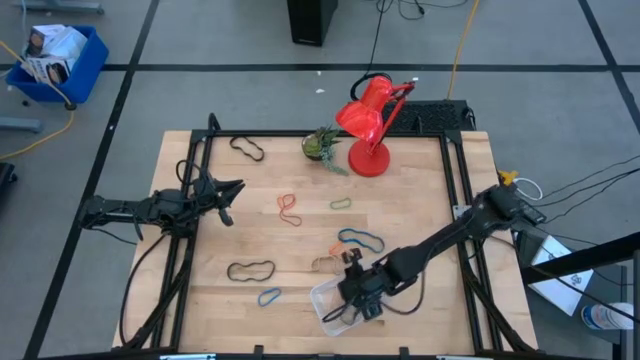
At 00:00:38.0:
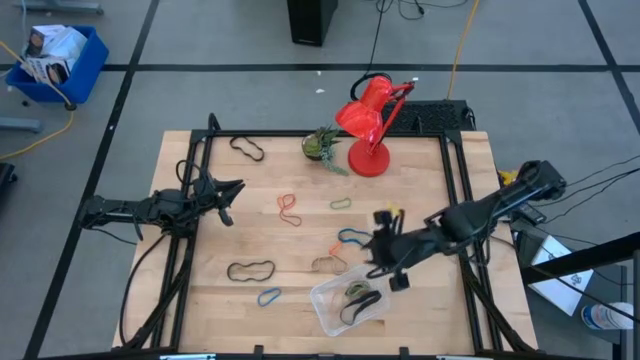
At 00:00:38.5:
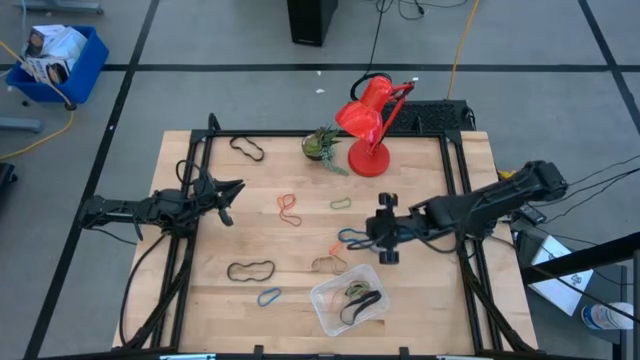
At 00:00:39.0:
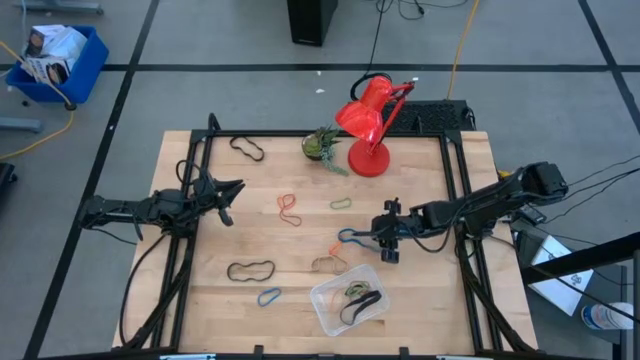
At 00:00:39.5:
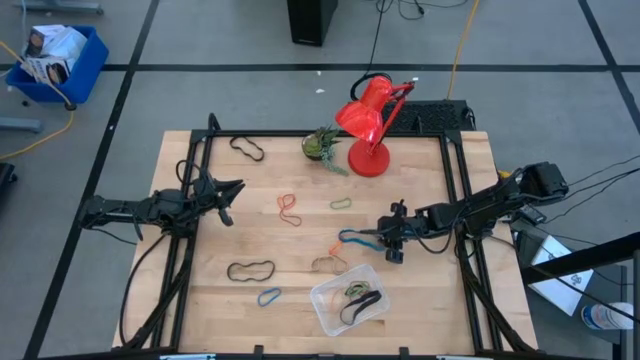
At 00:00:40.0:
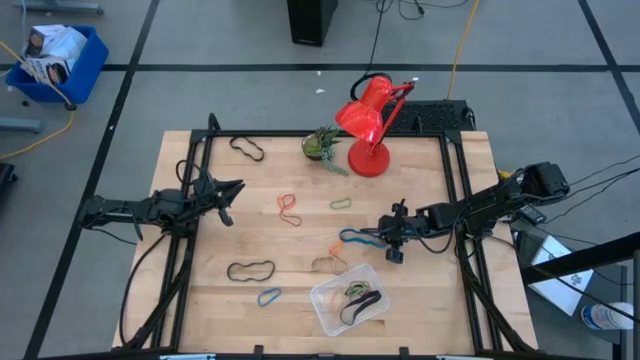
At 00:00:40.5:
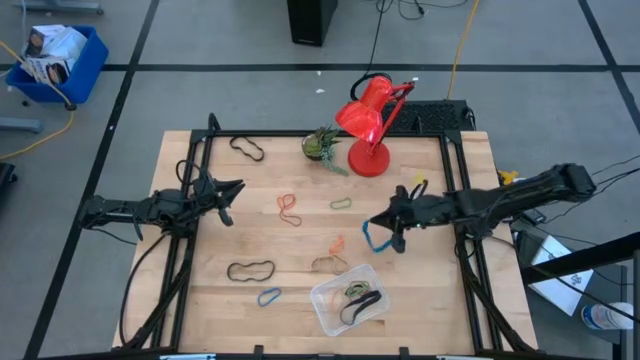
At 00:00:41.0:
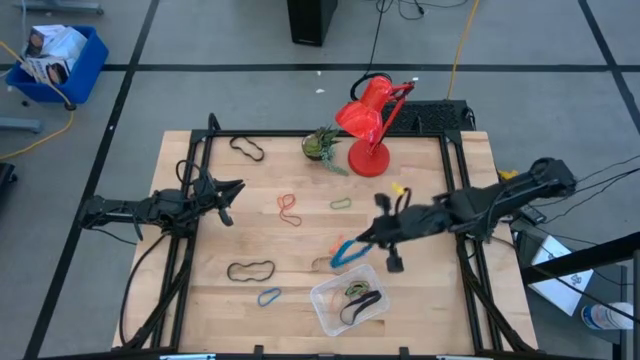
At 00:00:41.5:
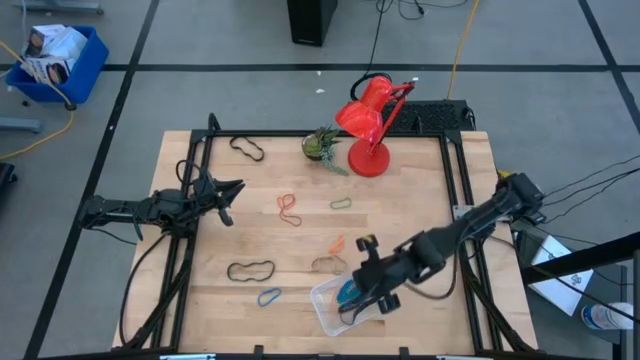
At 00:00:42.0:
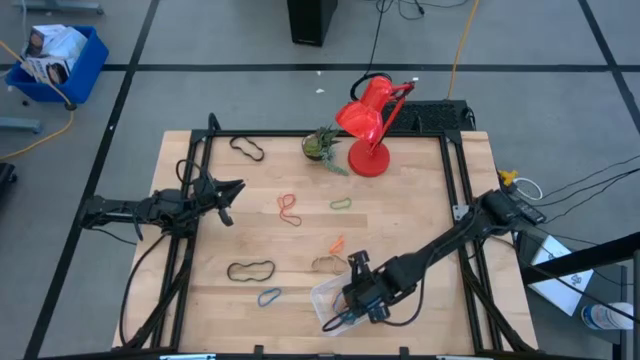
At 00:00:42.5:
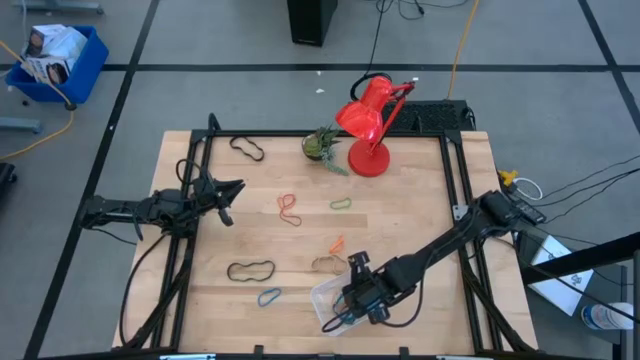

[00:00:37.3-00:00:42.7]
Task: Pick and place rubber bands into bin
Put the blue rubber band into the transparent container

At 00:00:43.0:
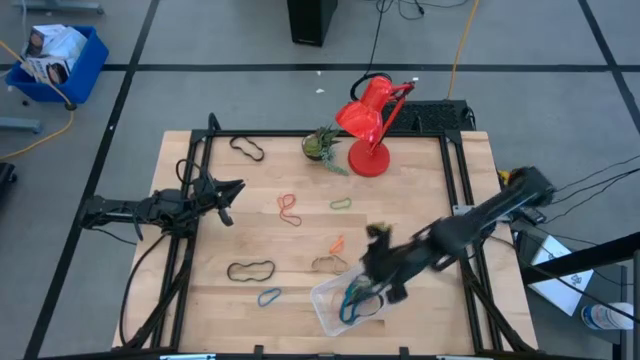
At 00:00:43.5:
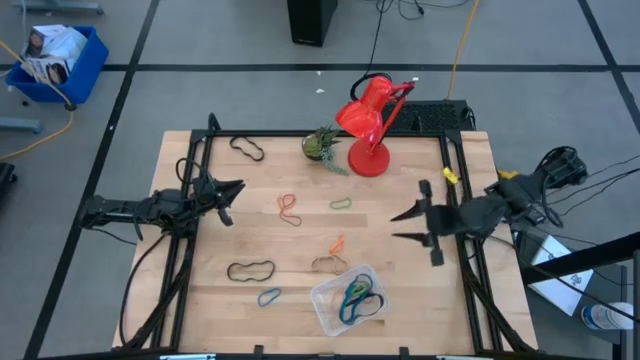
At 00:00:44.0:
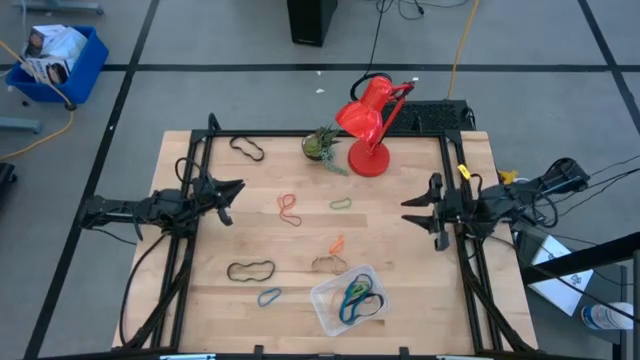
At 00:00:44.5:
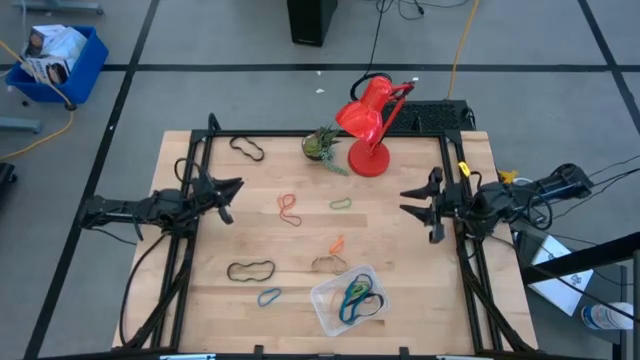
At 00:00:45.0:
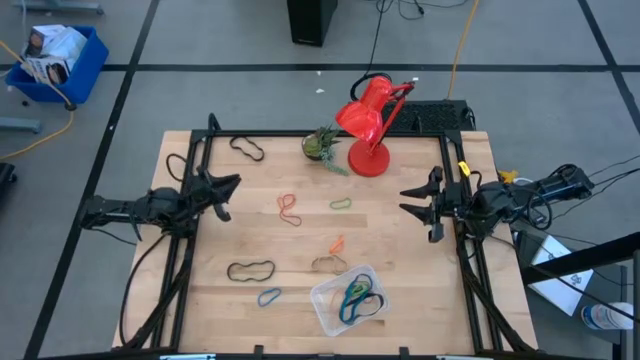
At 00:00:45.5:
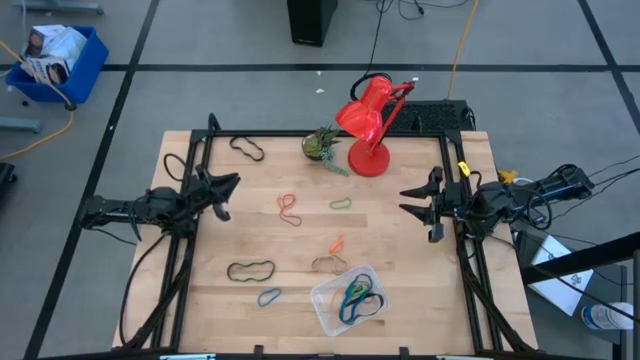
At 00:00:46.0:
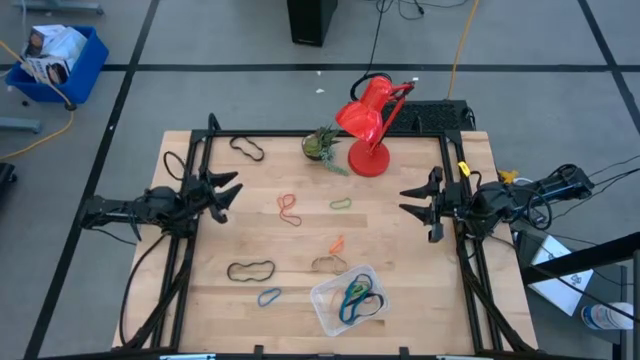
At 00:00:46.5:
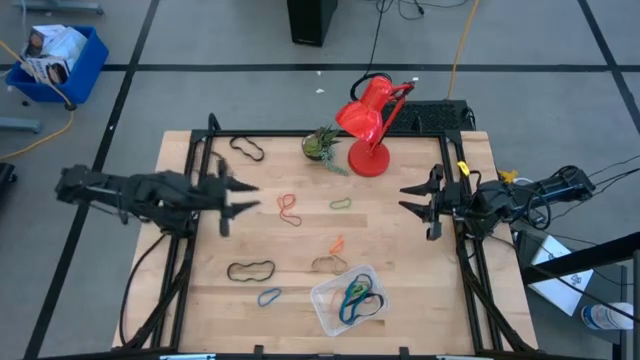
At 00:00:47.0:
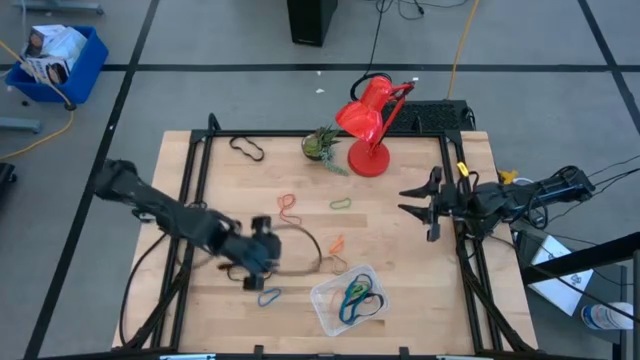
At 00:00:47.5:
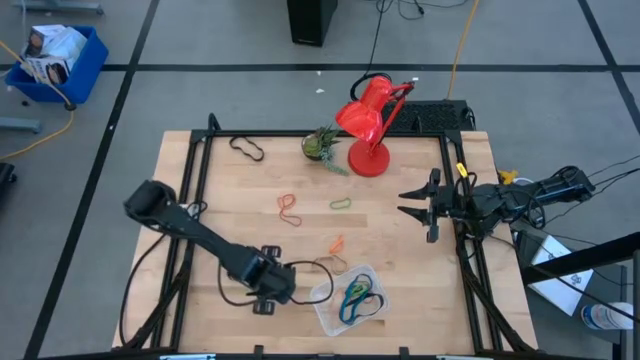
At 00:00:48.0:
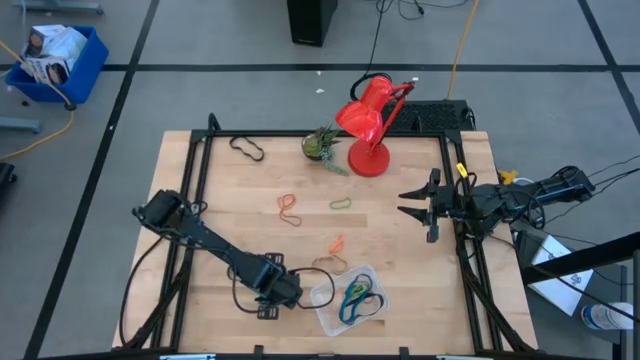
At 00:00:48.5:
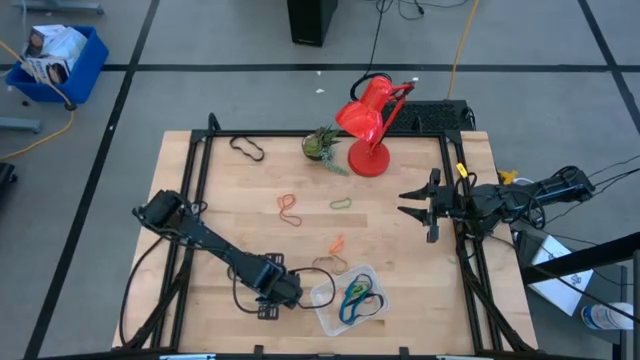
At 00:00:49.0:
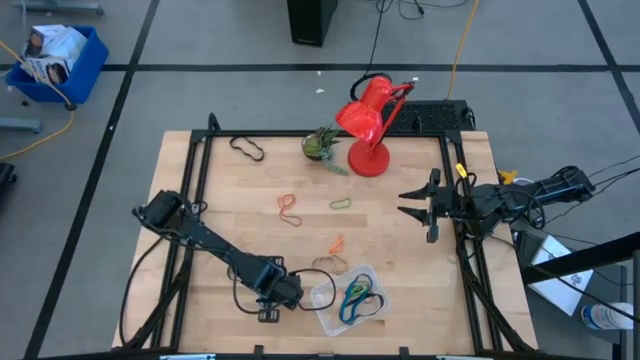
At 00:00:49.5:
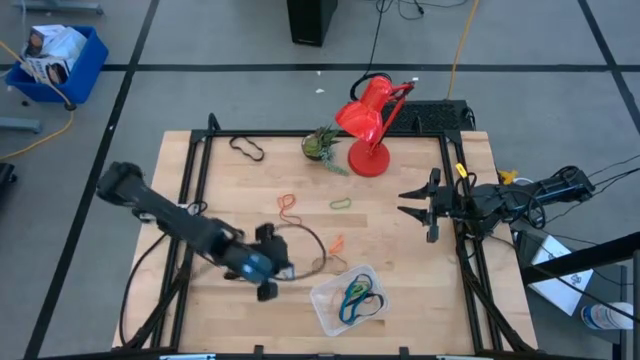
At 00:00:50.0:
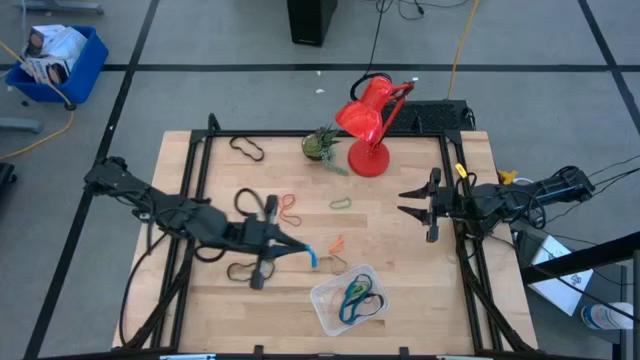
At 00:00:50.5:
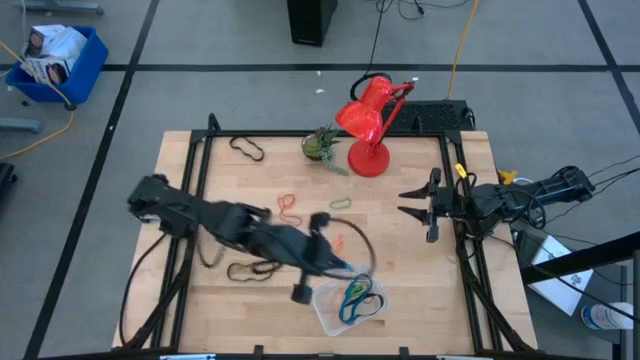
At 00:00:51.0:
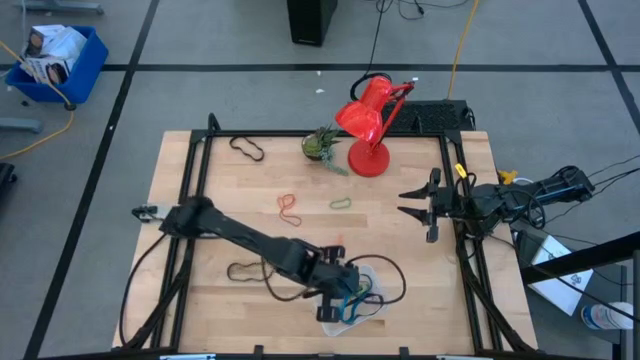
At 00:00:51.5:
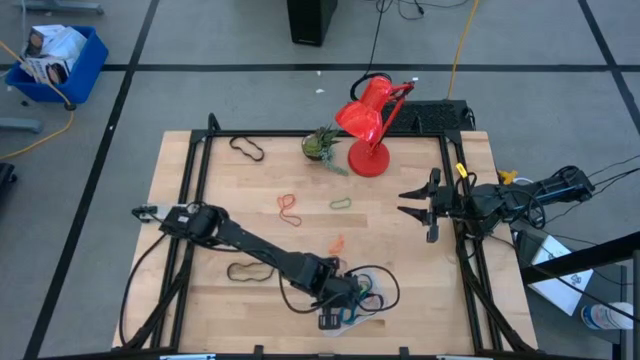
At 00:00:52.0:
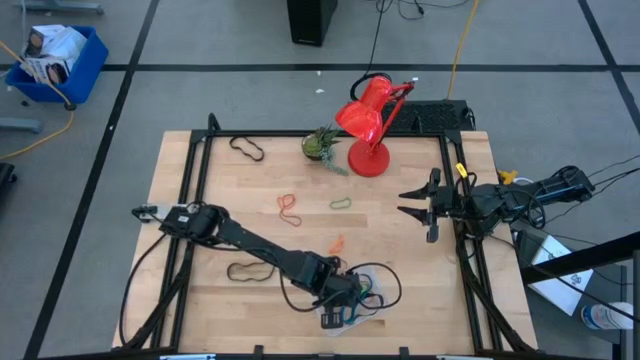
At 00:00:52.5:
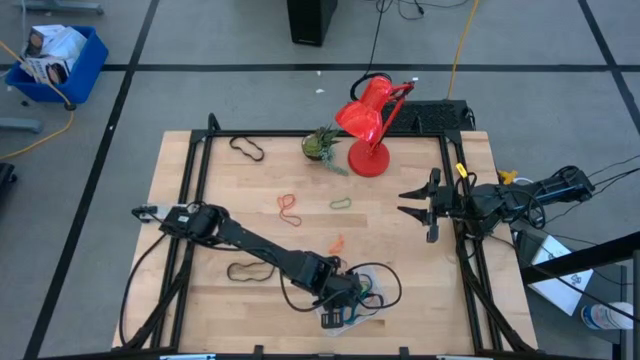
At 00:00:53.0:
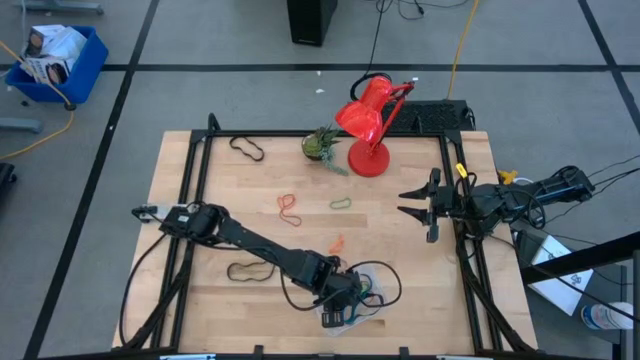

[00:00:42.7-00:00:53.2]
Put the blue rubber band into the transparent container

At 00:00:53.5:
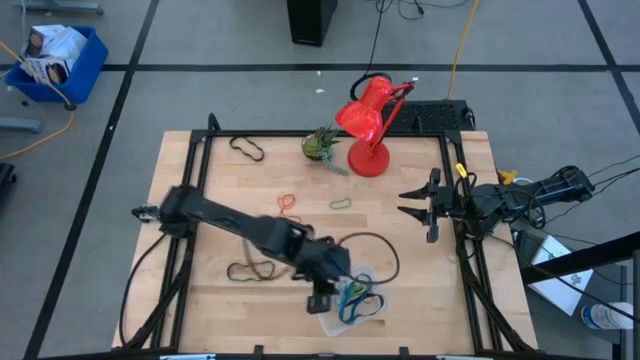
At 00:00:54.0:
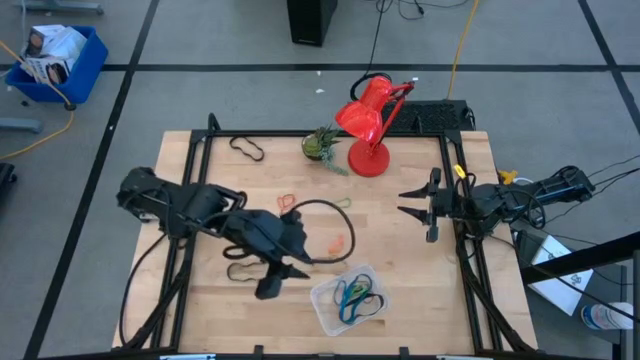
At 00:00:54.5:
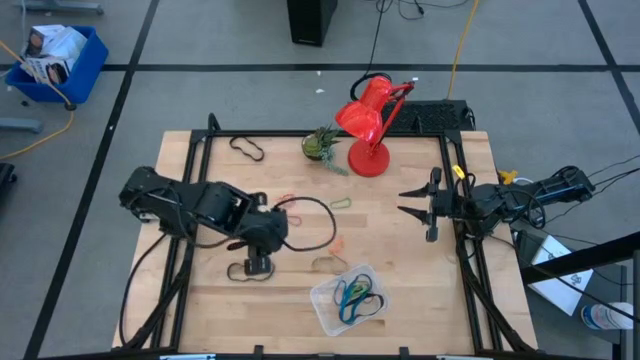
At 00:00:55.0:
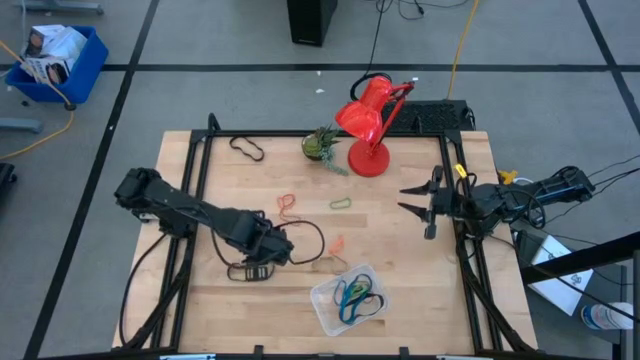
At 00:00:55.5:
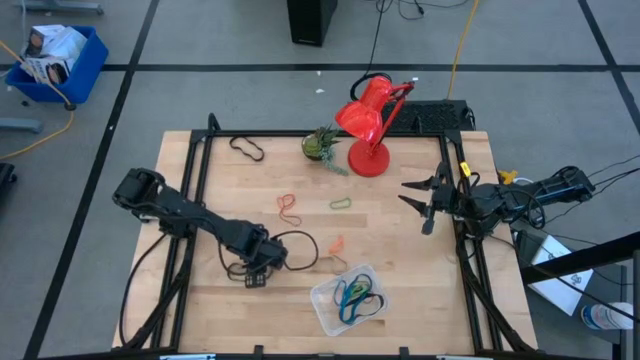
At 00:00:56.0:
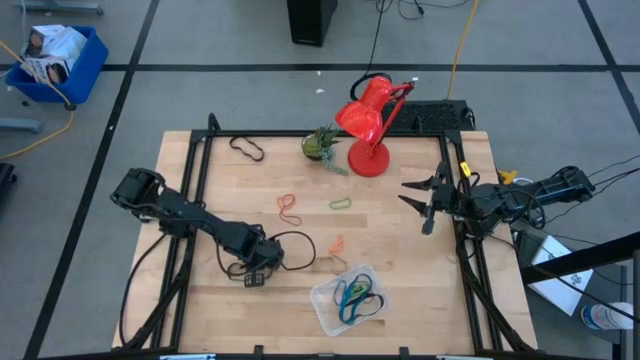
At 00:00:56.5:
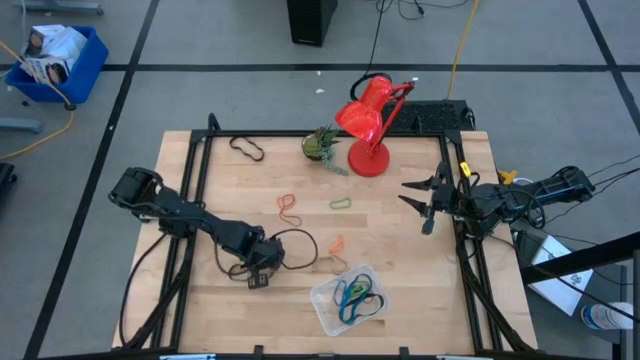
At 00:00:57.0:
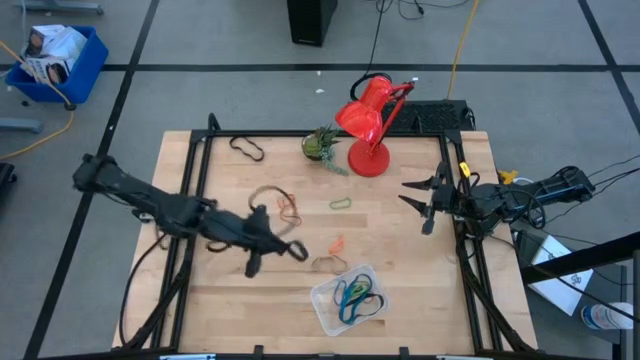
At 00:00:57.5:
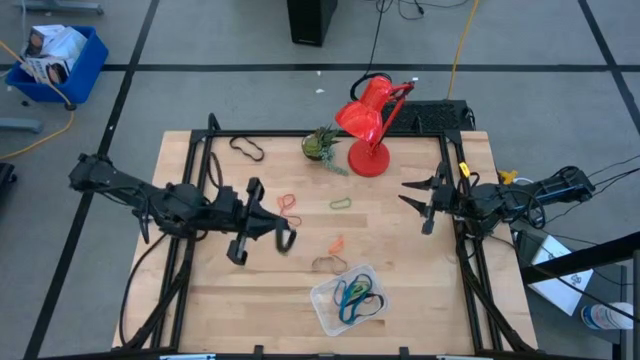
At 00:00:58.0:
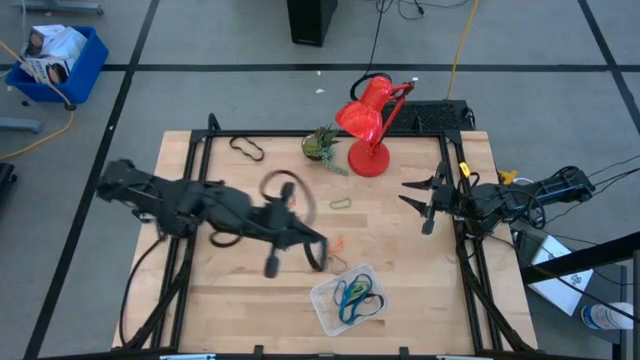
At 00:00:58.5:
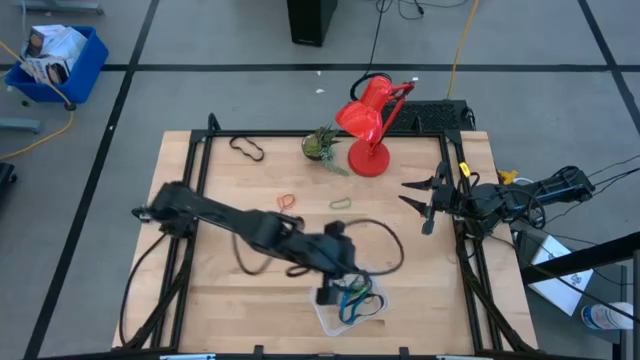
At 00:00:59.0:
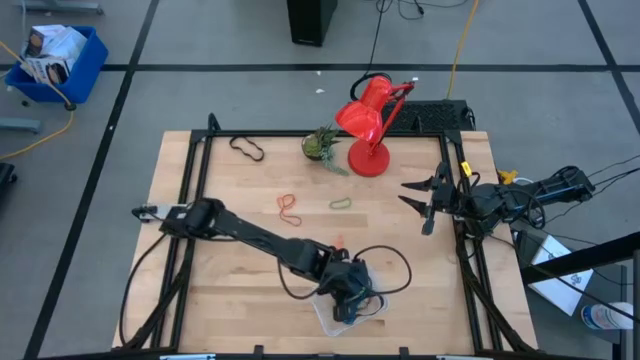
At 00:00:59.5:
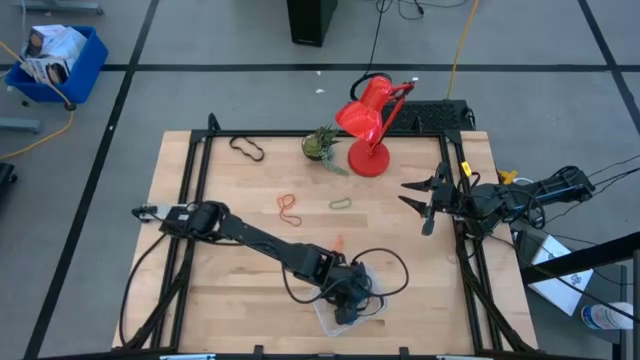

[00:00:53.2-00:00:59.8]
Put the black rubber band into the transparent container
